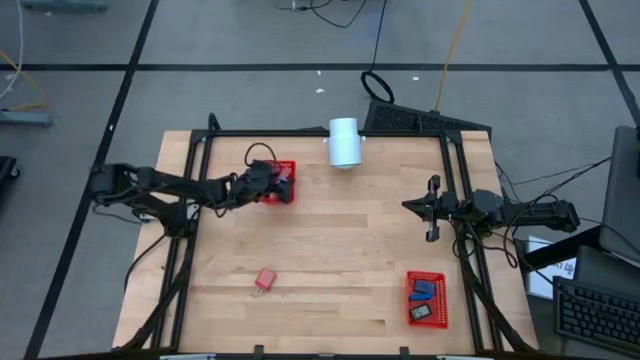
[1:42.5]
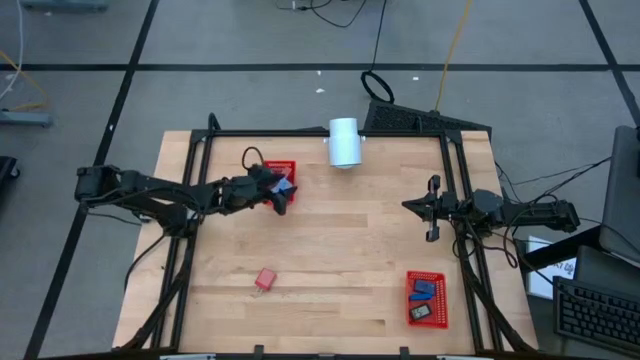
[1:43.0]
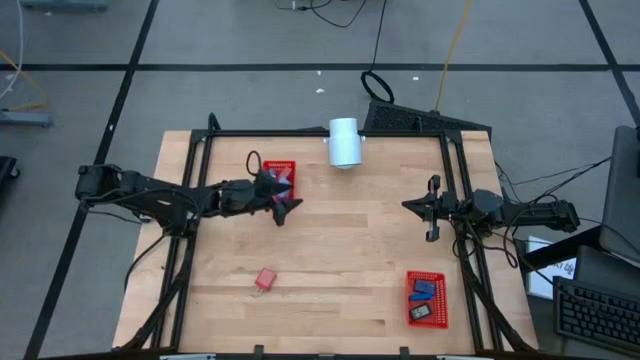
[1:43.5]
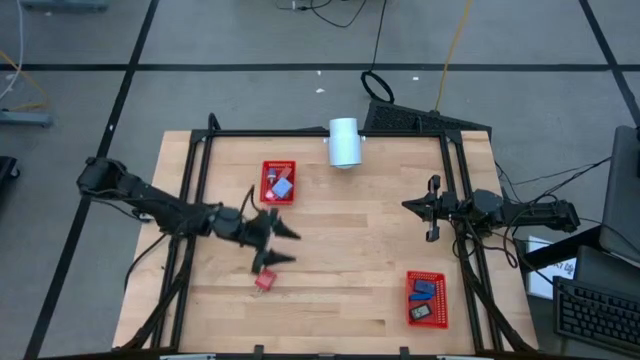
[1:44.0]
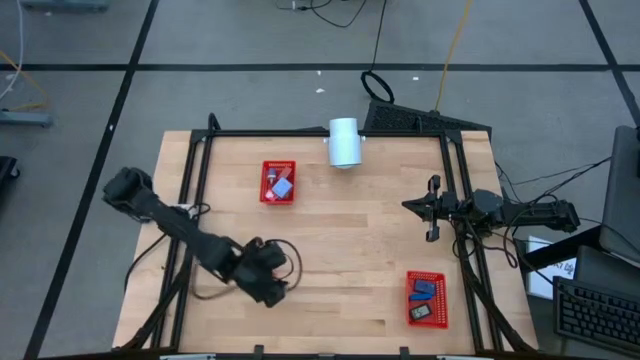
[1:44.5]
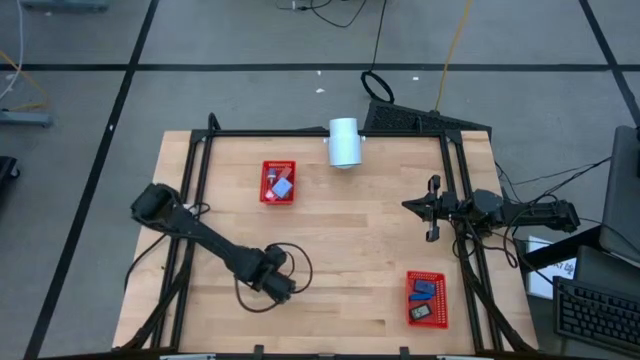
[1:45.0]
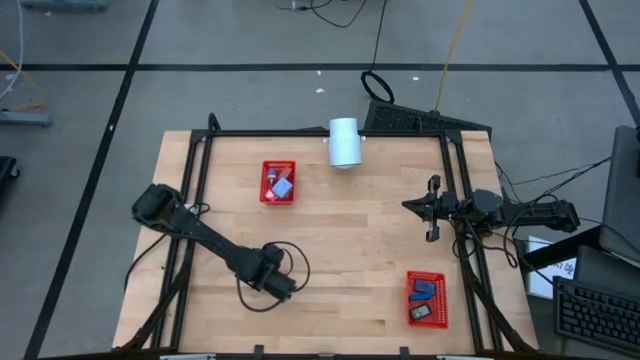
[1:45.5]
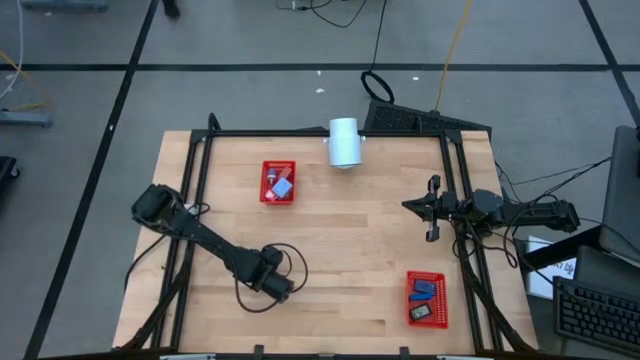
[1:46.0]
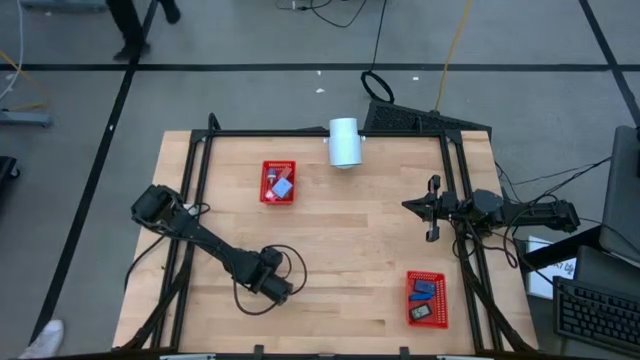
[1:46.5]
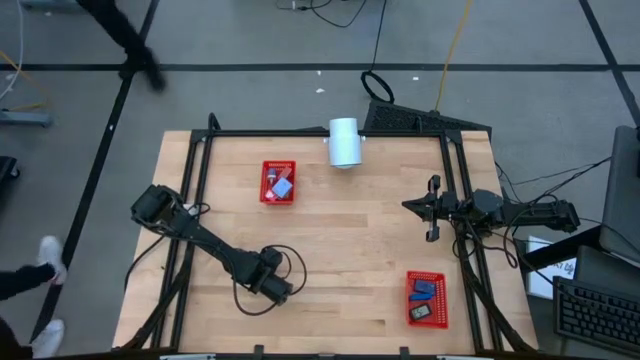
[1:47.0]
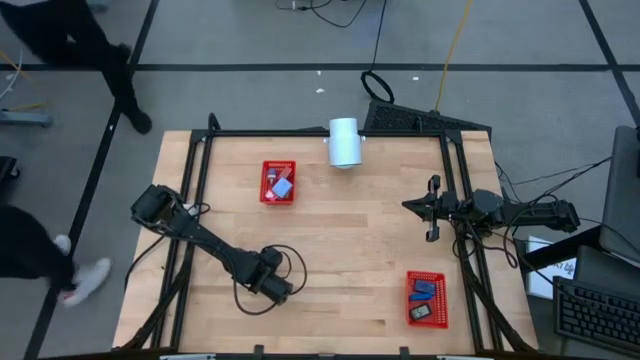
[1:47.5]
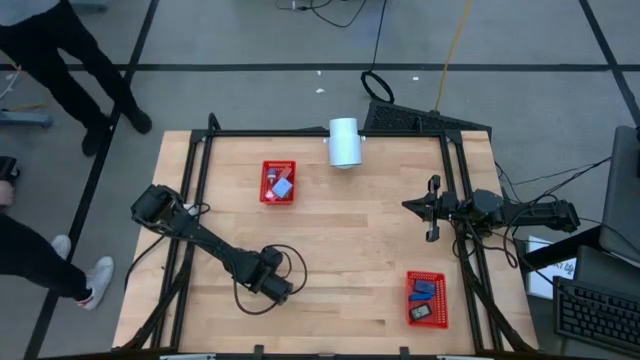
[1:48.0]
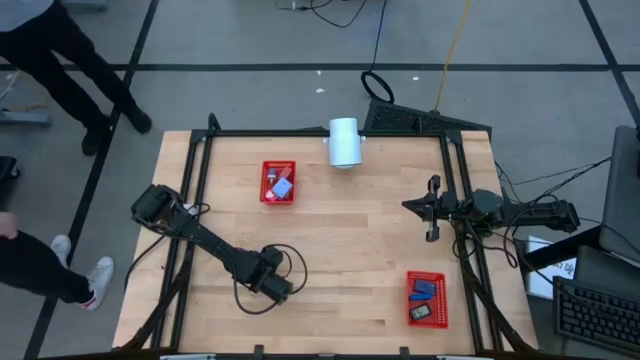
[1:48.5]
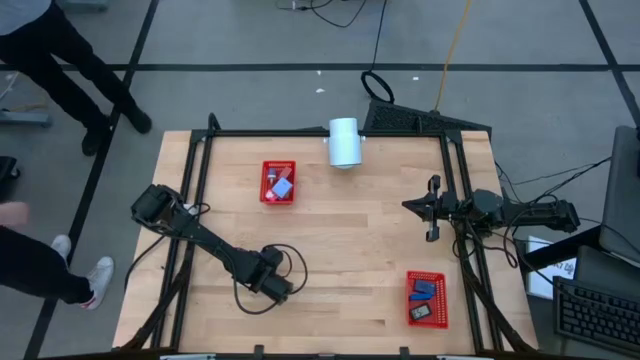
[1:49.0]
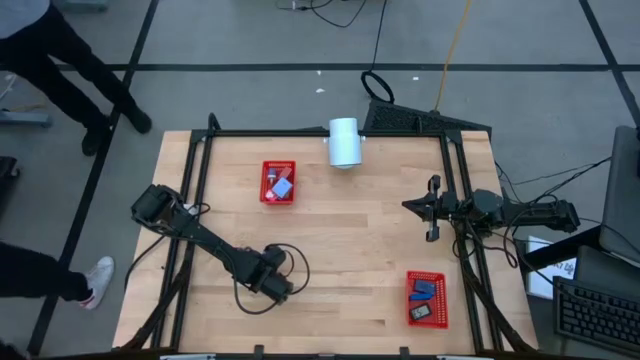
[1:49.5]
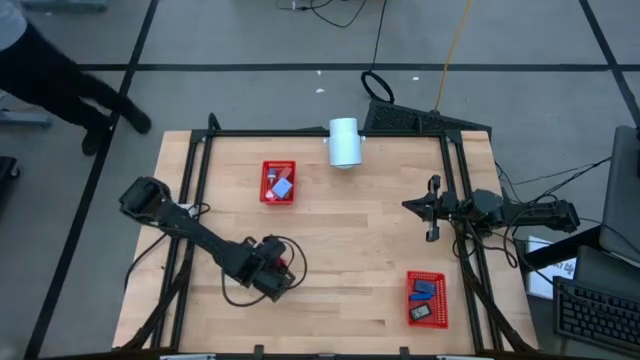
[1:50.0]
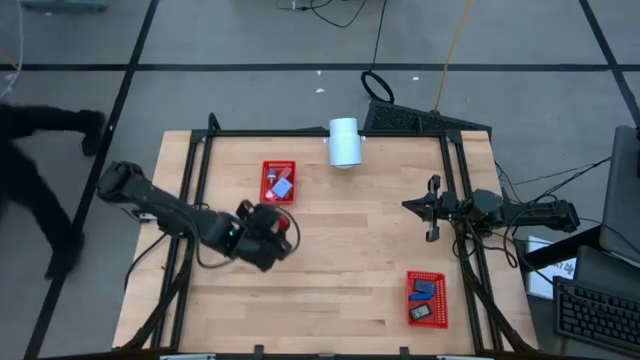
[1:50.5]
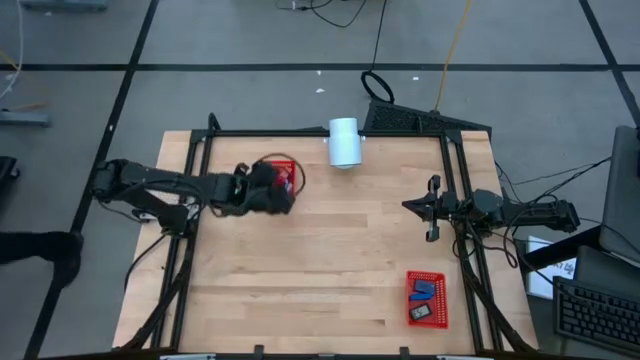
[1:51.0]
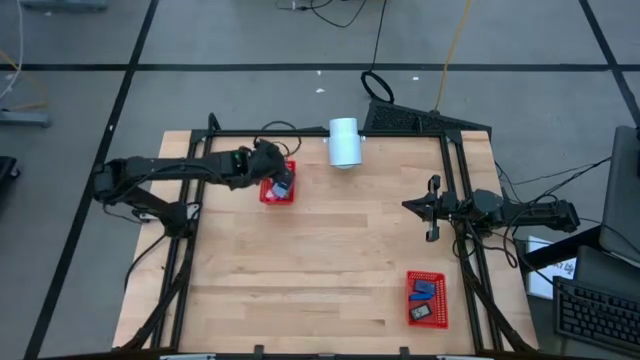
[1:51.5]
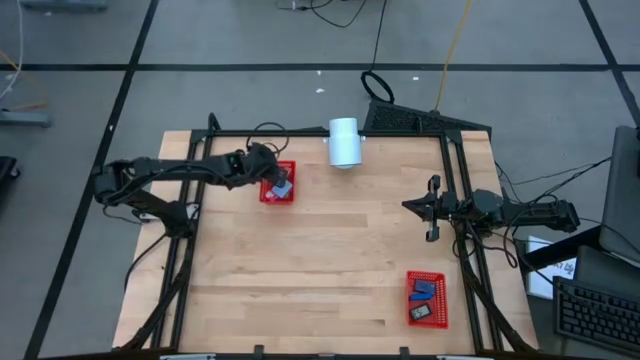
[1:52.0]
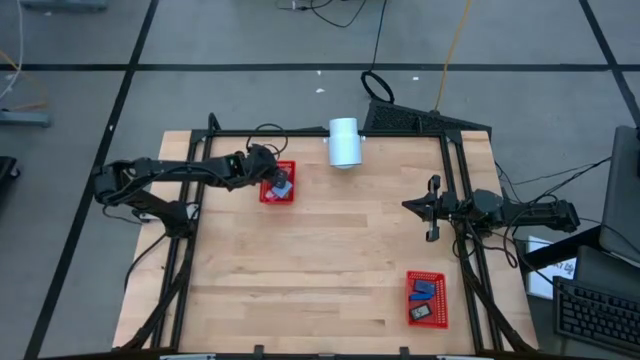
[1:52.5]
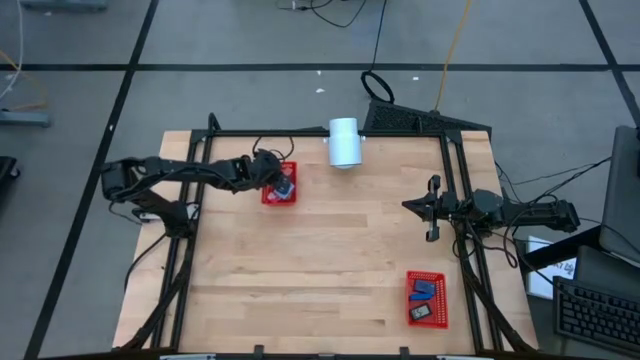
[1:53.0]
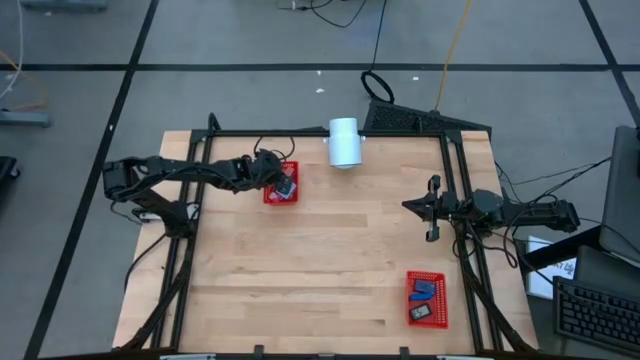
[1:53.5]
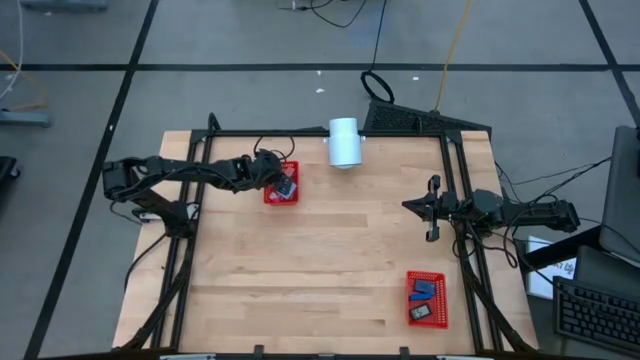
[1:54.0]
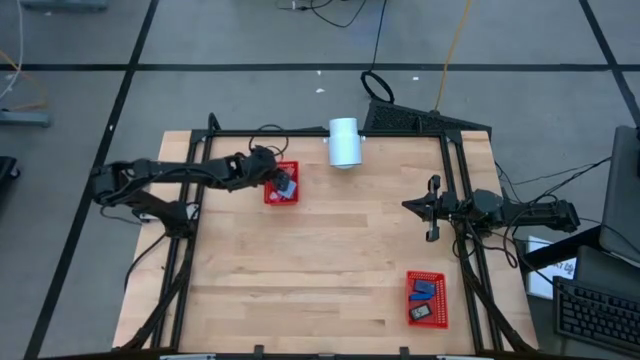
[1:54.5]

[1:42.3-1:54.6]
Task: Pick & Place Office items
Put the red charger adapter into the top red bin

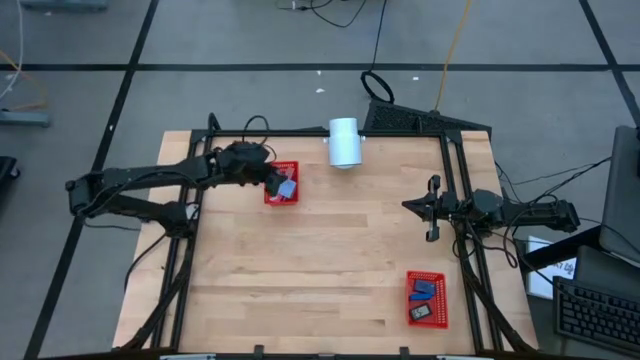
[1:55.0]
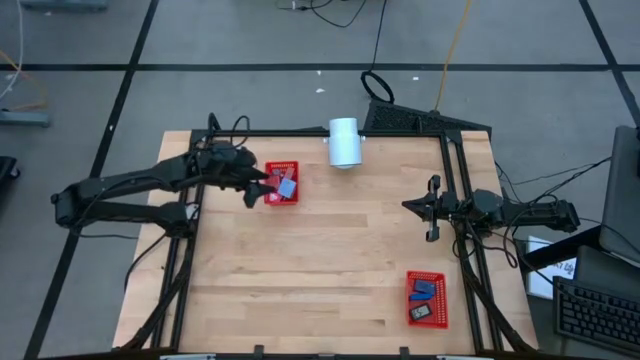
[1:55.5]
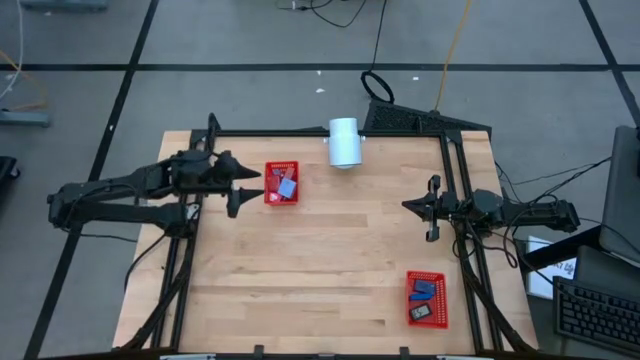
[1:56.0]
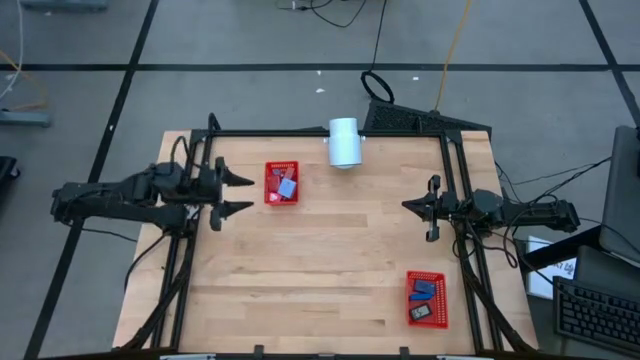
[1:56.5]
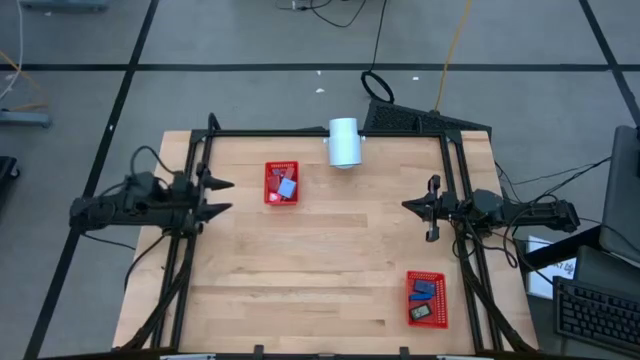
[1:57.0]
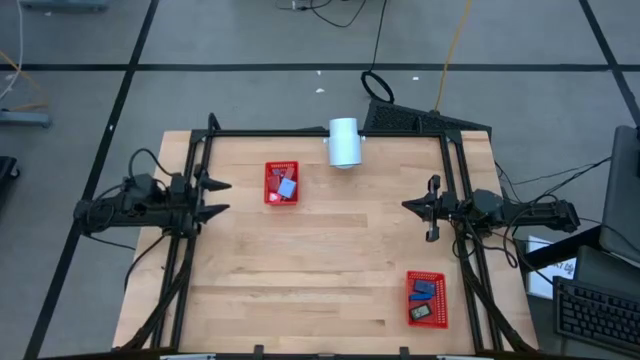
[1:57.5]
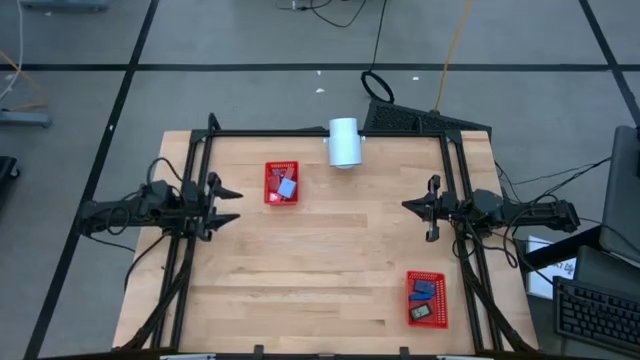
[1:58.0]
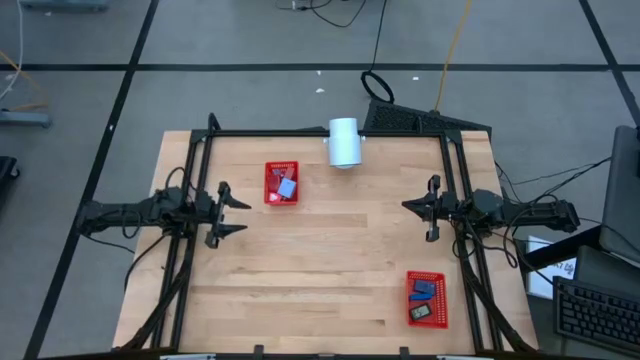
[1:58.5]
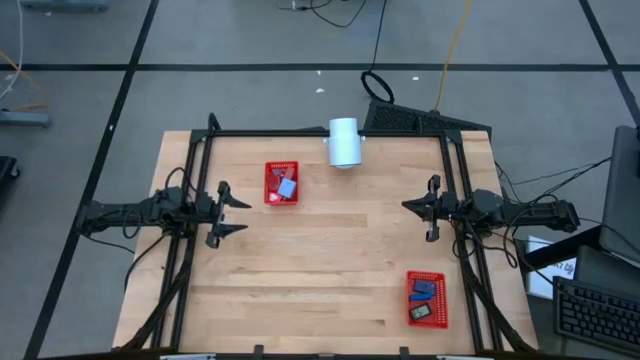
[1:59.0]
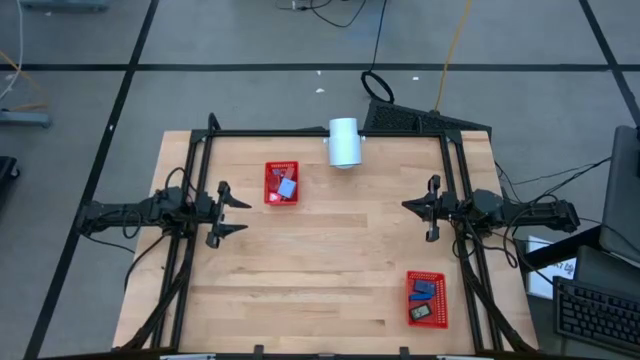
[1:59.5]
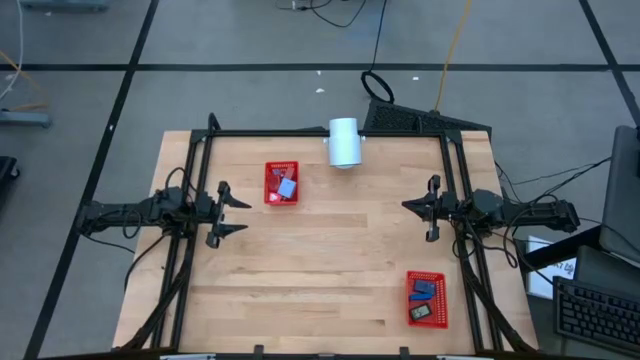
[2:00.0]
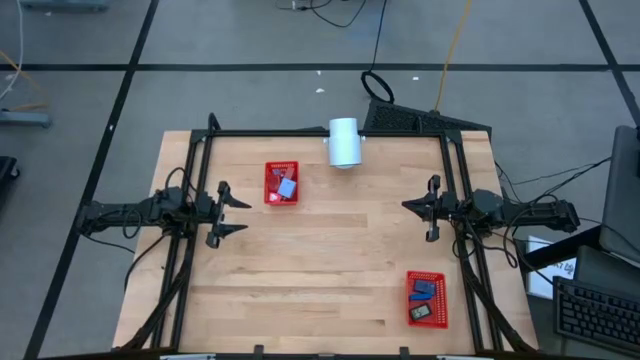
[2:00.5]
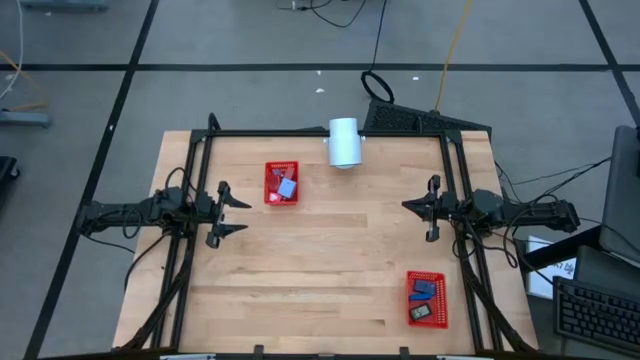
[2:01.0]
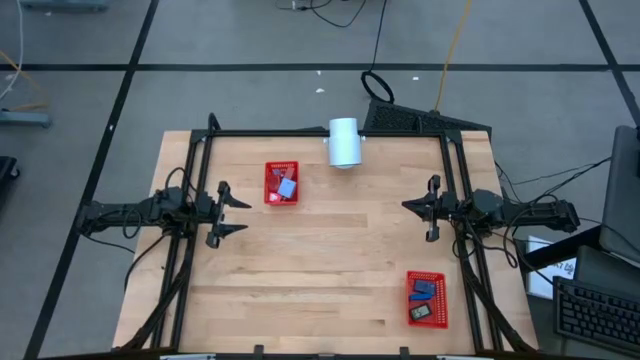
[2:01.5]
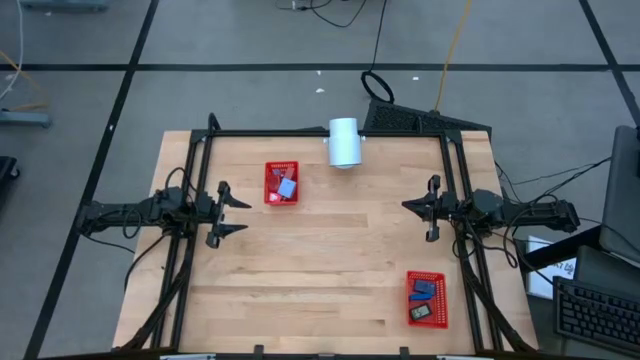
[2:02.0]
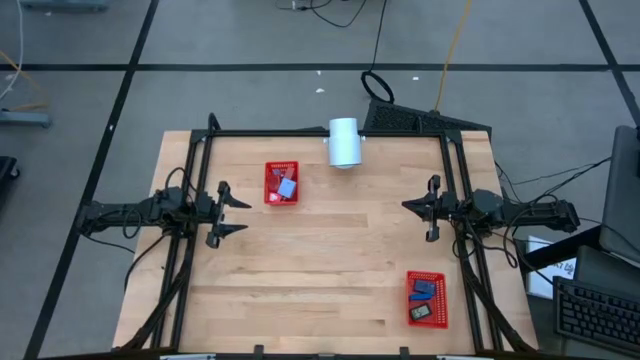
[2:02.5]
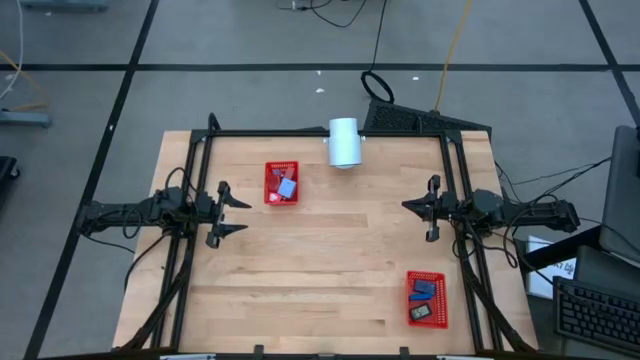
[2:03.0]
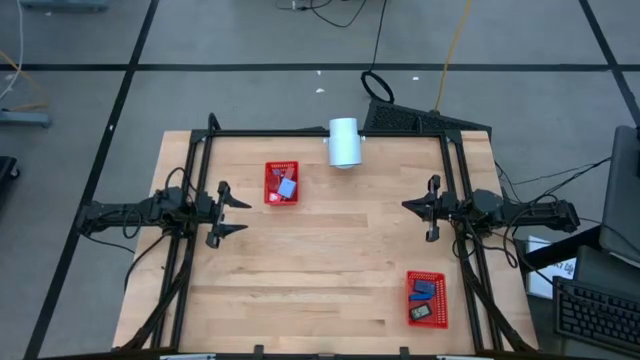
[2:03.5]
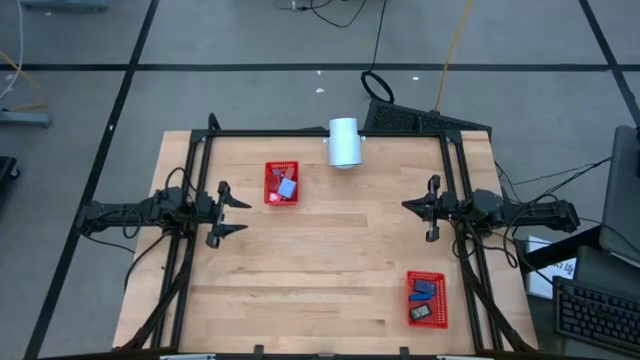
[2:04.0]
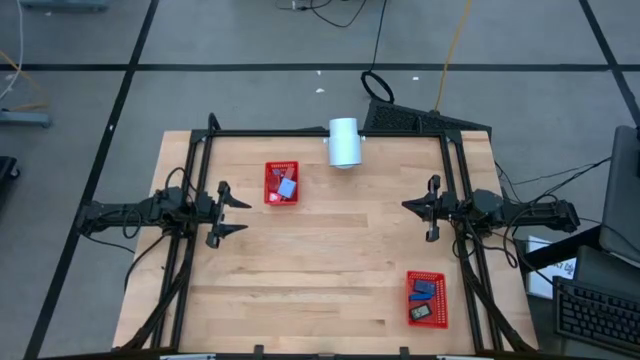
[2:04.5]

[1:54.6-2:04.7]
Return to Home Position
